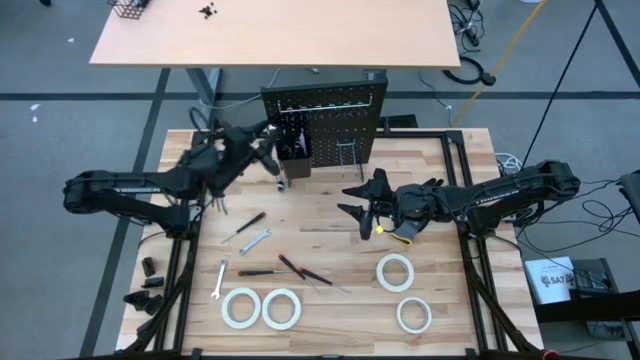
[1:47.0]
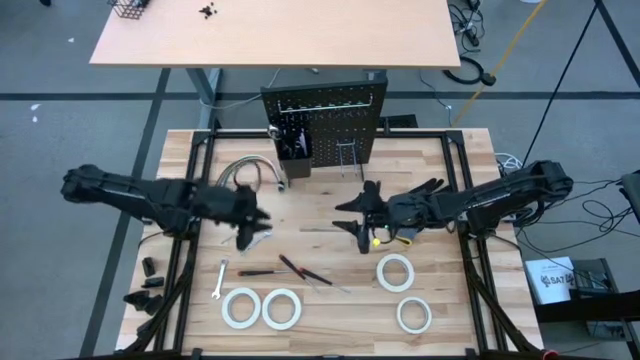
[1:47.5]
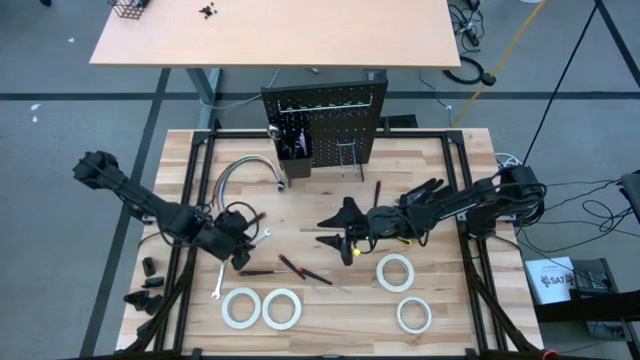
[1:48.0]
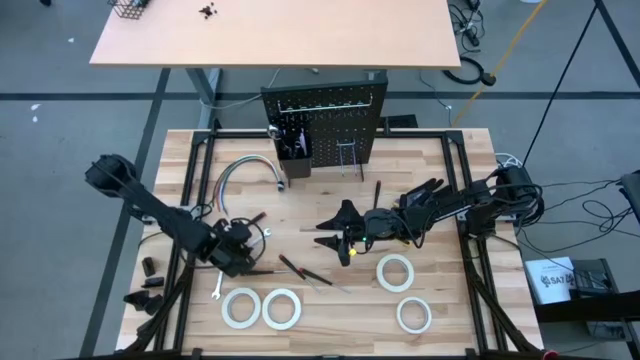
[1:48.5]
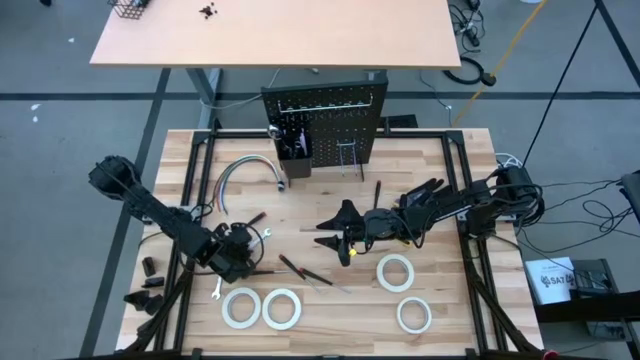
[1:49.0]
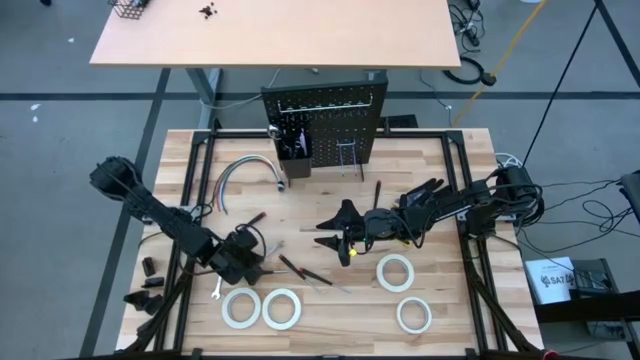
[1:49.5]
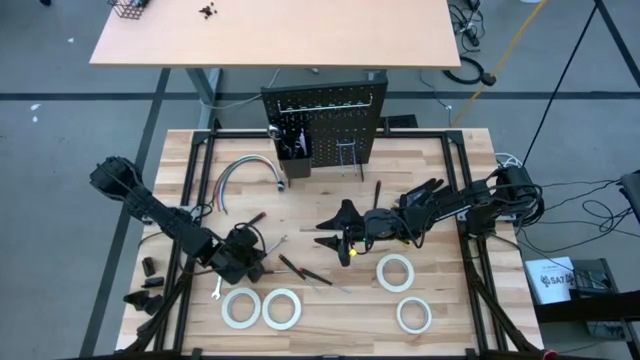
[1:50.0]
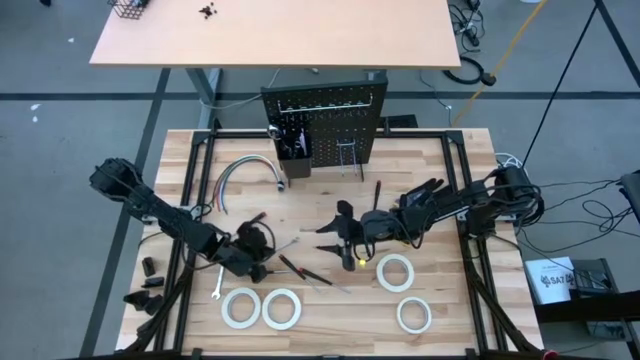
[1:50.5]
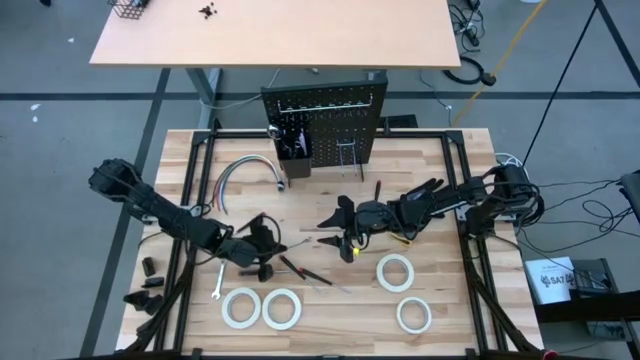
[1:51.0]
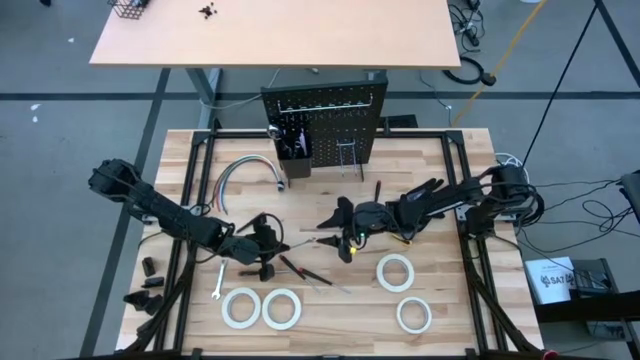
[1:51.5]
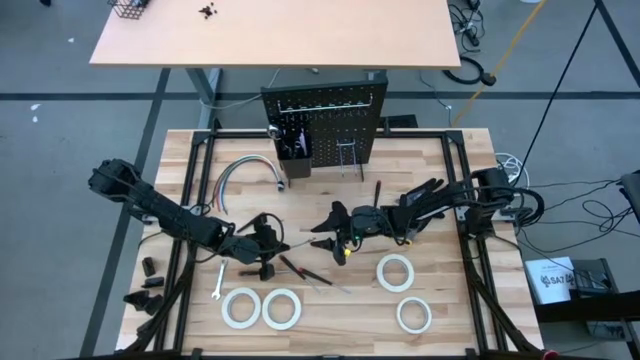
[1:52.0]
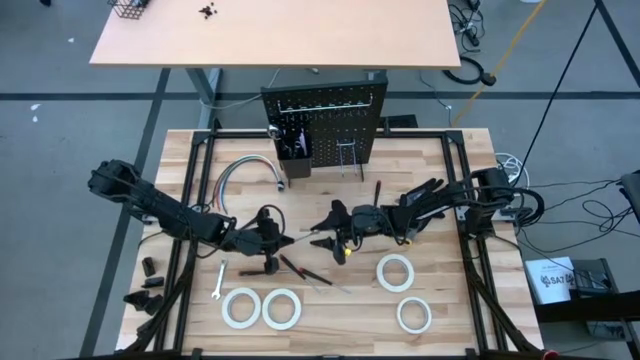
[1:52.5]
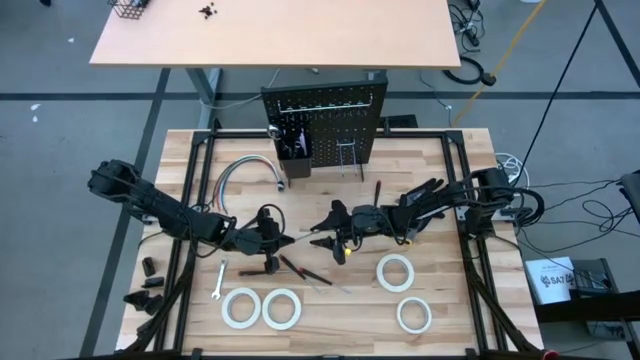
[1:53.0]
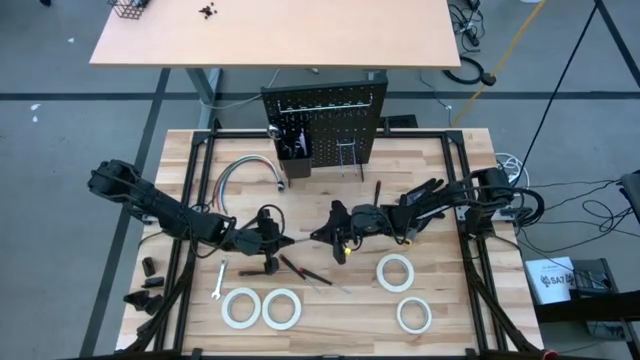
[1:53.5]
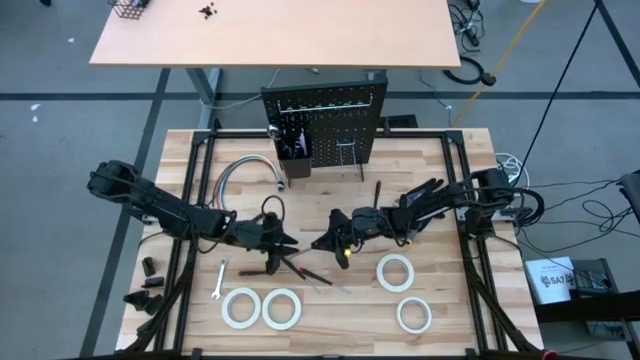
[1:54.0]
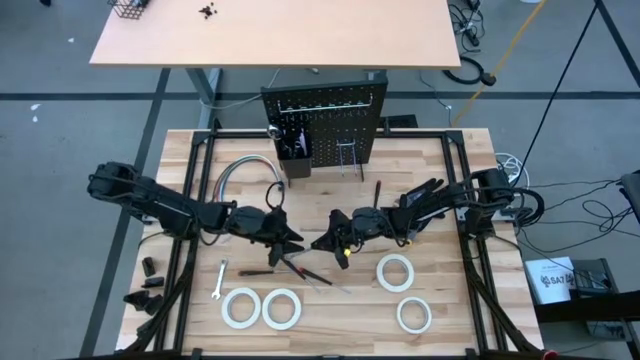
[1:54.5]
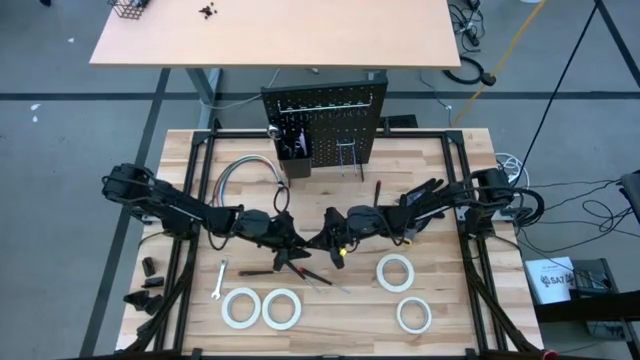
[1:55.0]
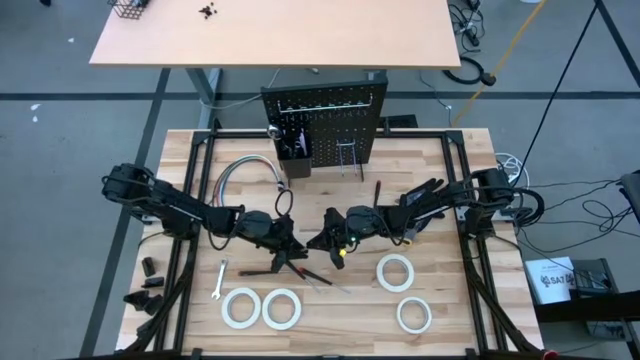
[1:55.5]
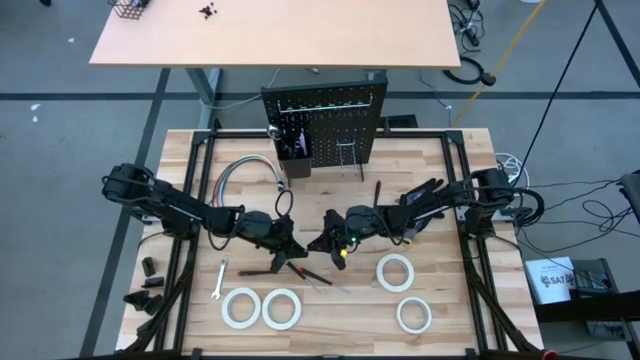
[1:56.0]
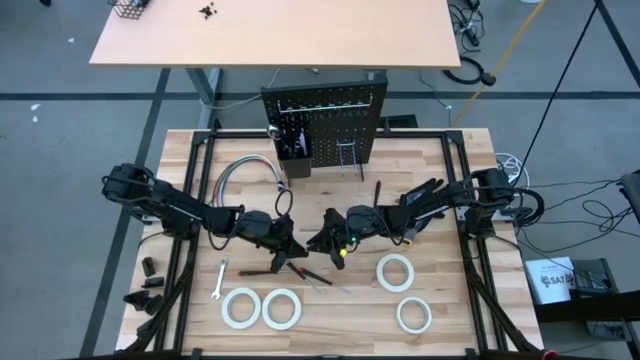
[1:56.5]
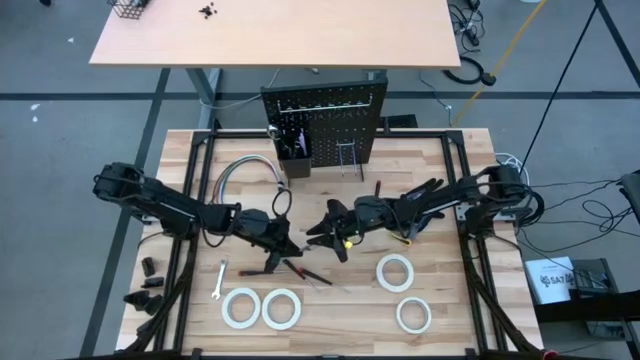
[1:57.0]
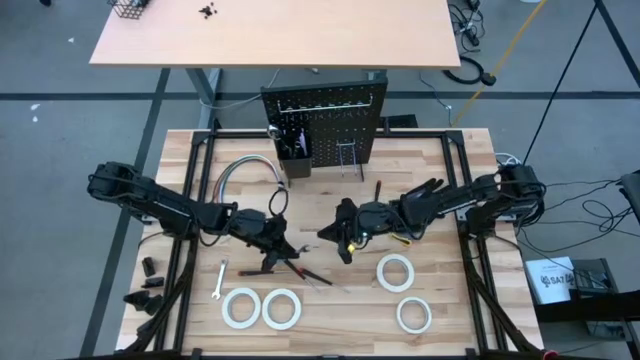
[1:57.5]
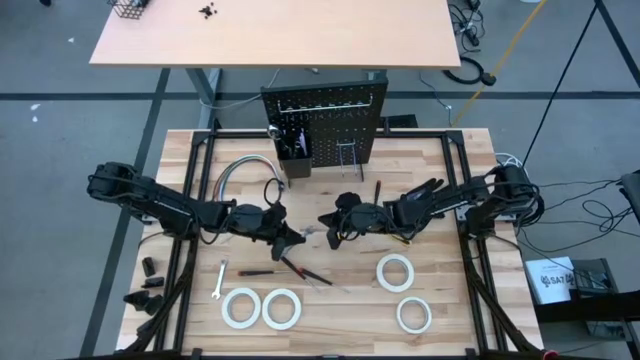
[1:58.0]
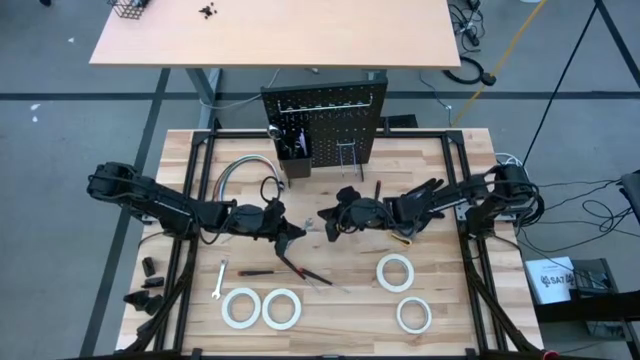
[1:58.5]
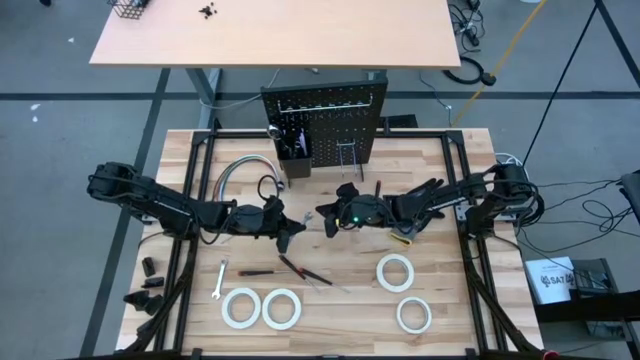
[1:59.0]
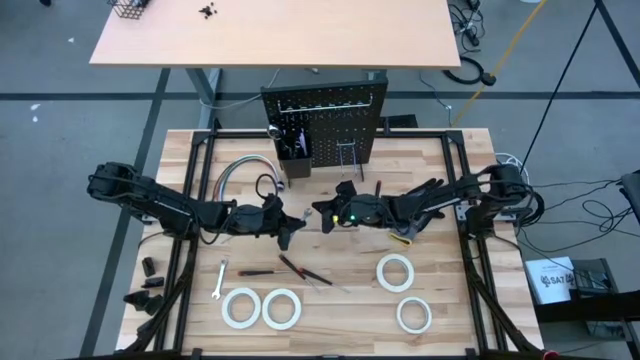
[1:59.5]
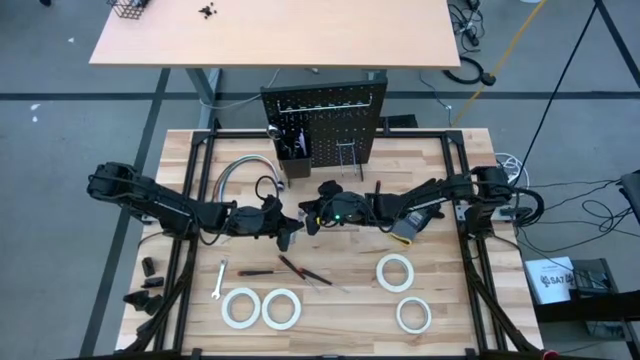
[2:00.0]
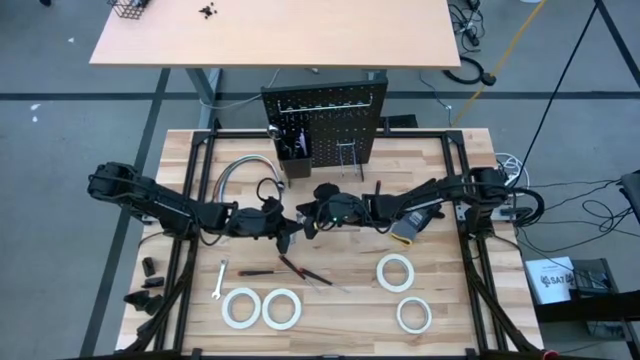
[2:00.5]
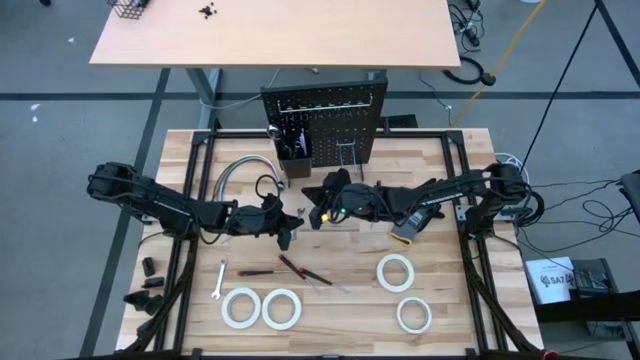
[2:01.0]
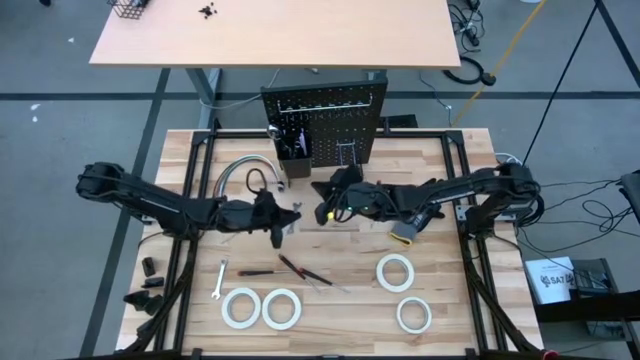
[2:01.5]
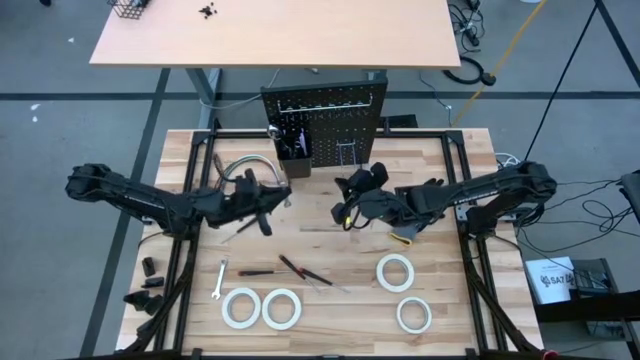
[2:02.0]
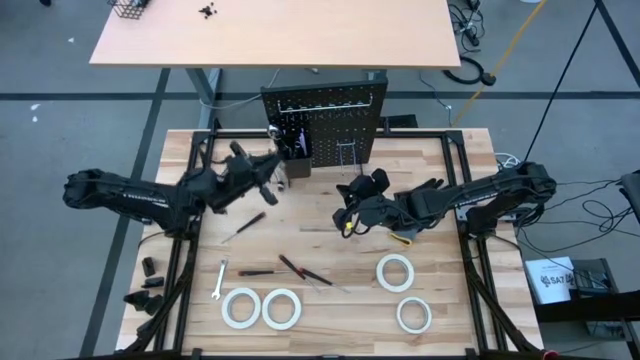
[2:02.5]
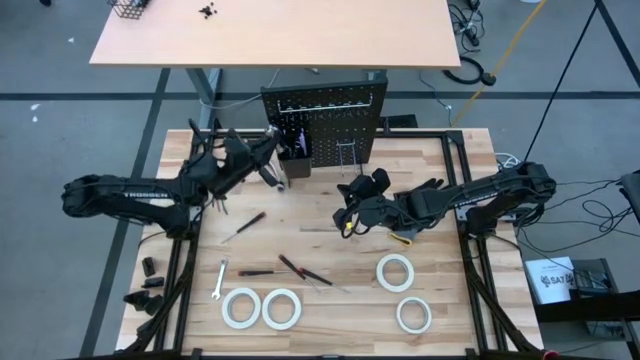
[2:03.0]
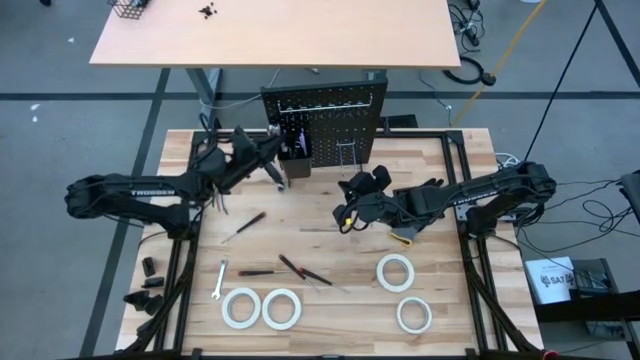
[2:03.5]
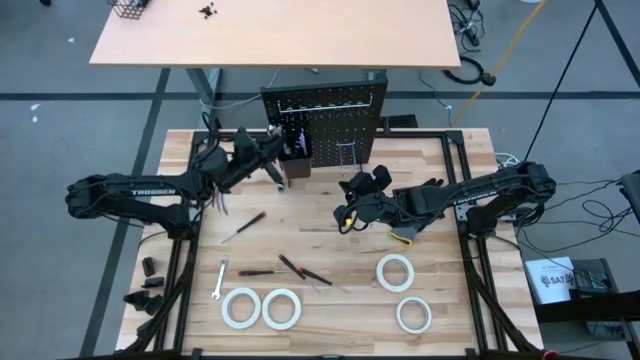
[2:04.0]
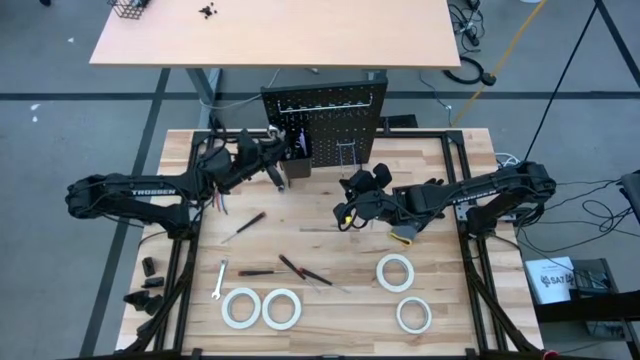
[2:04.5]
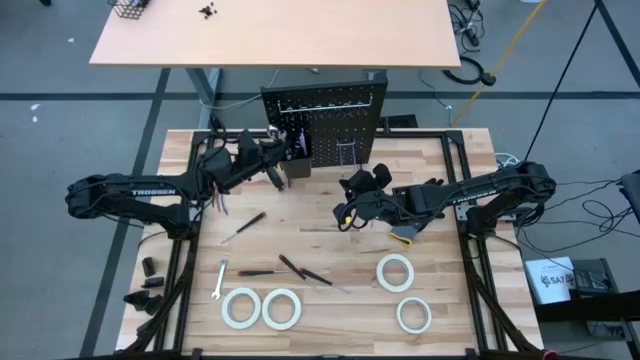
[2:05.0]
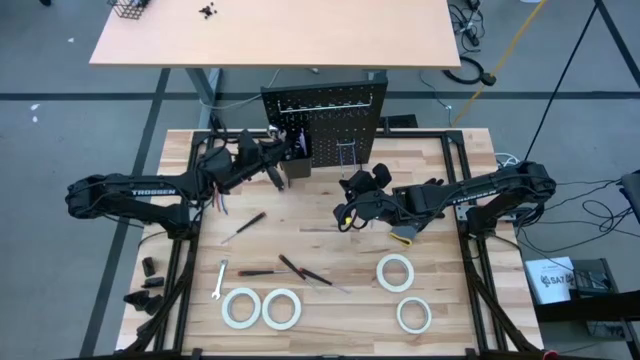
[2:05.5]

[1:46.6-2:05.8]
Task: Hang tools onto peg board
Put the wrench into the peg board

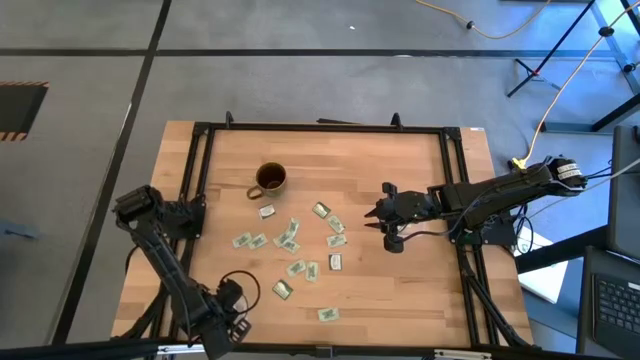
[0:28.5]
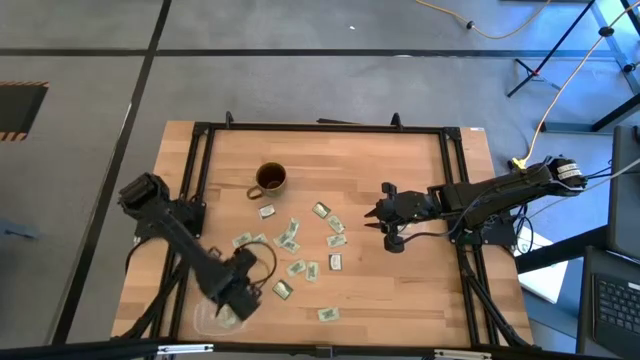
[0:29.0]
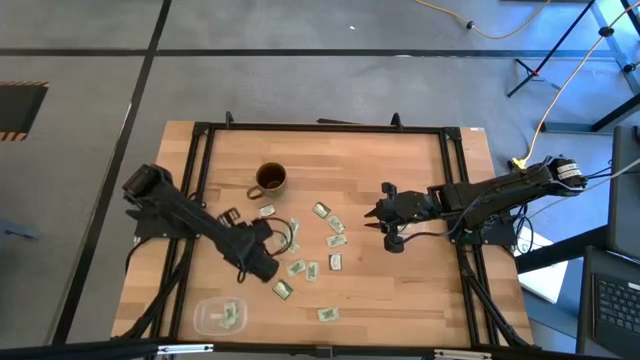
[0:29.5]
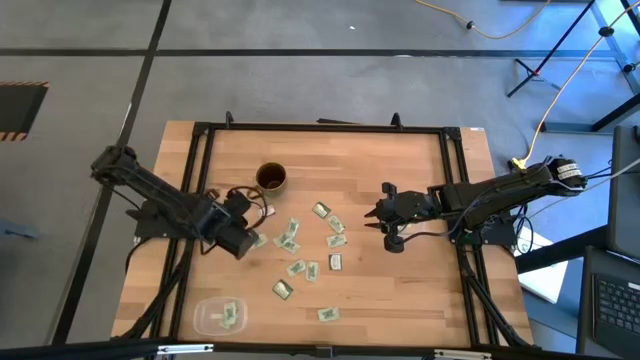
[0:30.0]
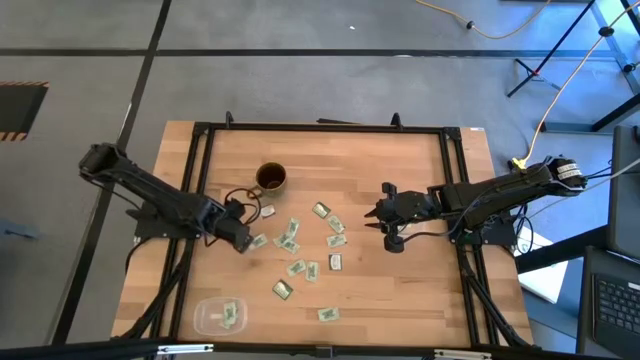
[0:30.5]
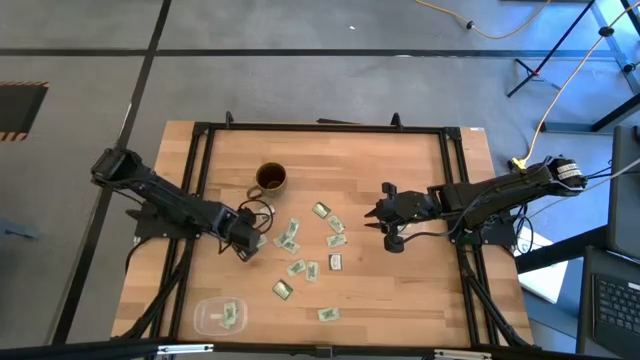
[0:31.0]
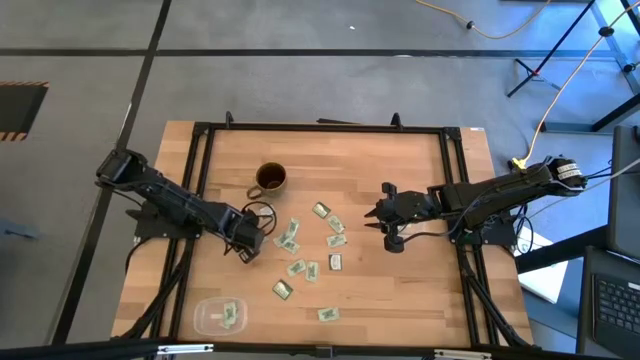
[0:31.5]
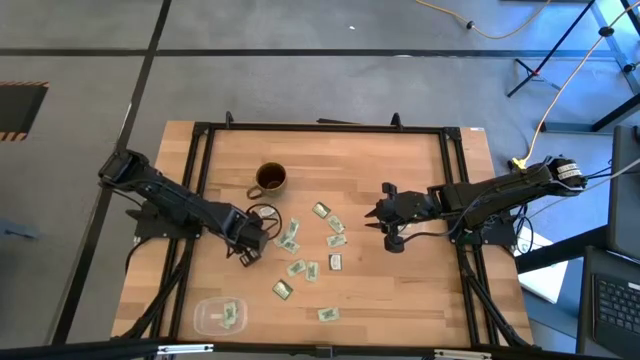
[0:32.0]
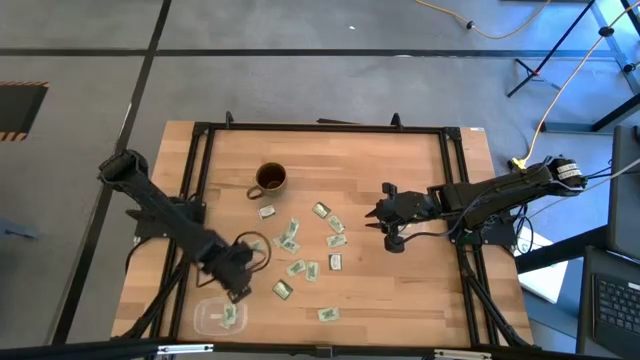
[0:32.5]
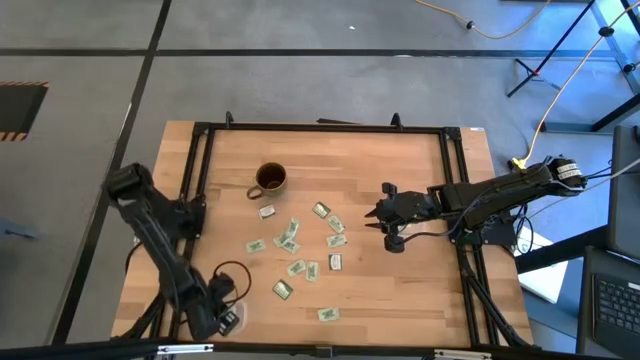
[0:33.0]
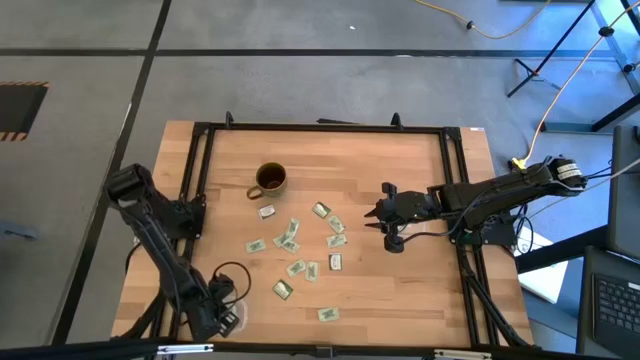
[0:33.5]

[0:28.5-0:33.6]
Task: Pick and place Stevia / Truvia into bins
Put the stevia packet into the bottom transparent container
